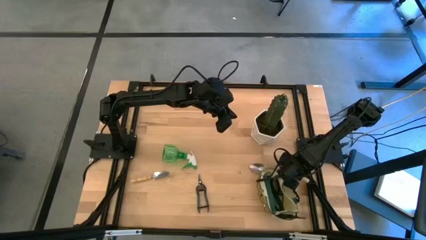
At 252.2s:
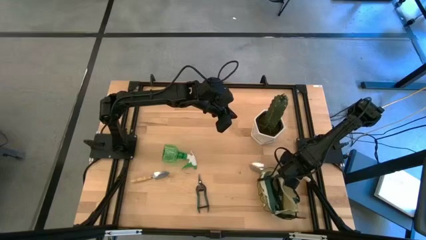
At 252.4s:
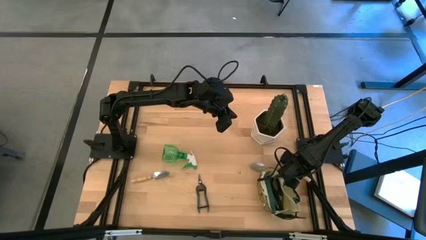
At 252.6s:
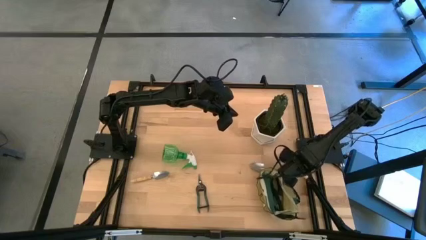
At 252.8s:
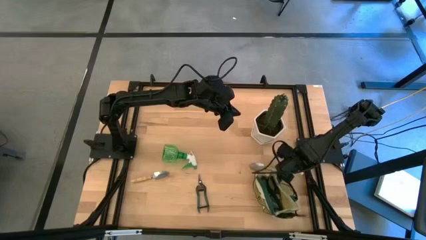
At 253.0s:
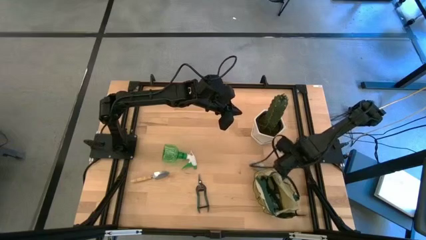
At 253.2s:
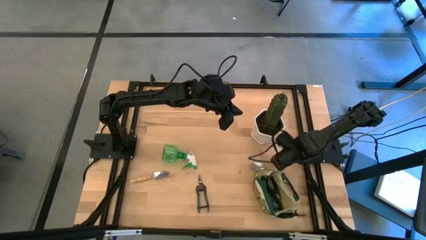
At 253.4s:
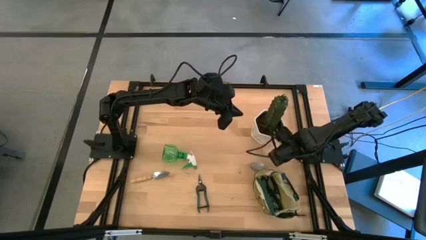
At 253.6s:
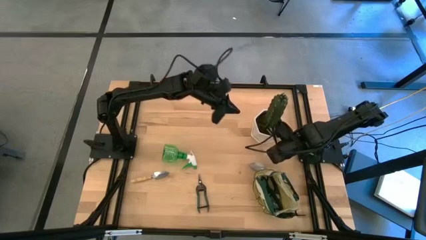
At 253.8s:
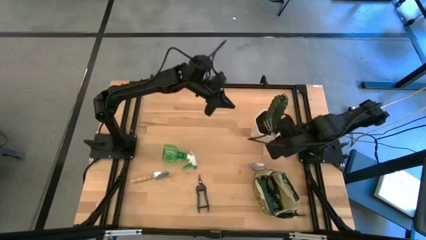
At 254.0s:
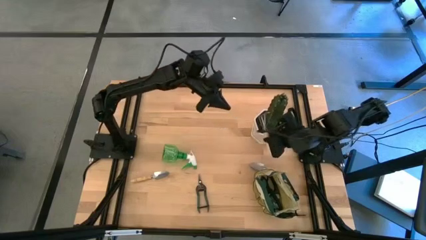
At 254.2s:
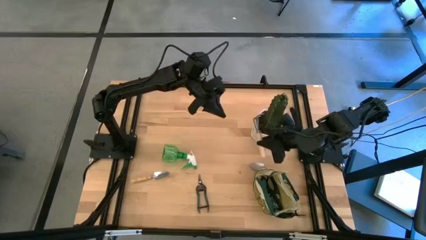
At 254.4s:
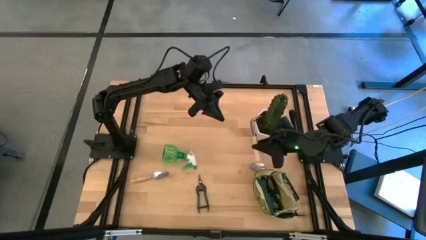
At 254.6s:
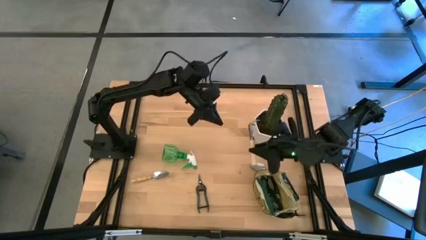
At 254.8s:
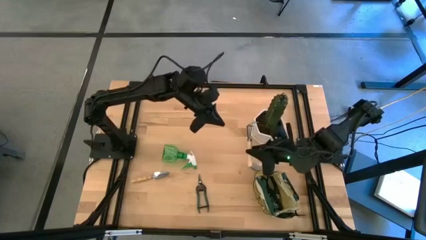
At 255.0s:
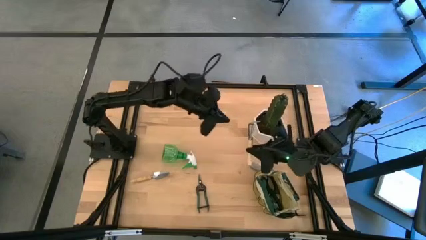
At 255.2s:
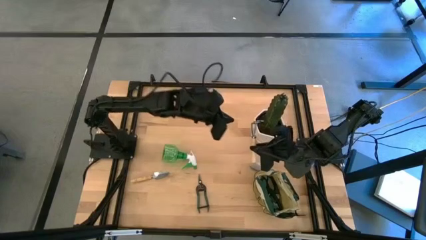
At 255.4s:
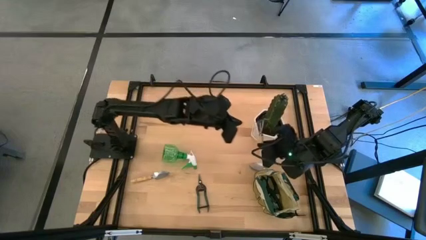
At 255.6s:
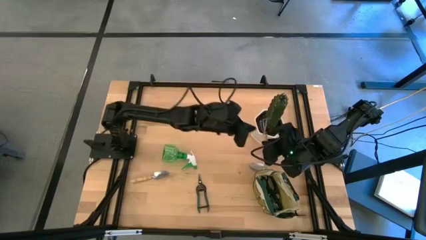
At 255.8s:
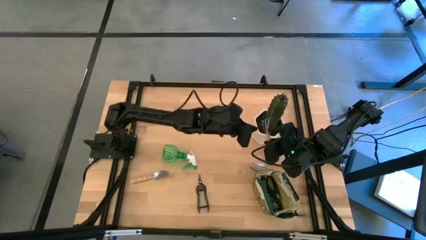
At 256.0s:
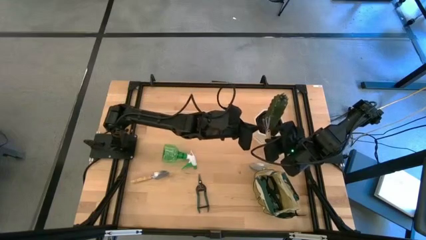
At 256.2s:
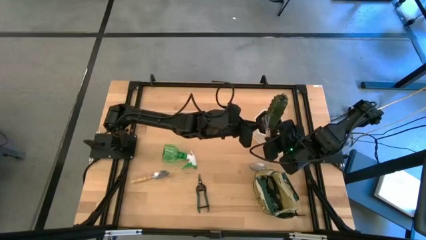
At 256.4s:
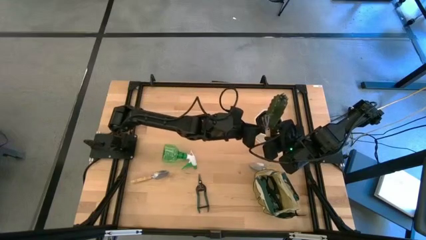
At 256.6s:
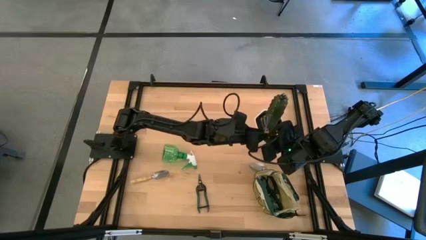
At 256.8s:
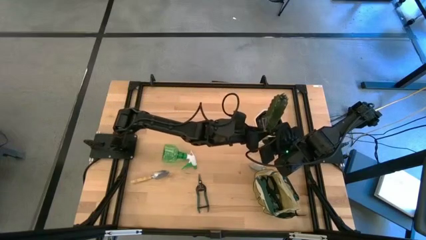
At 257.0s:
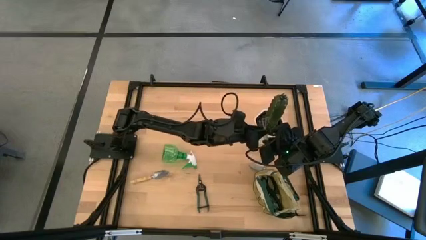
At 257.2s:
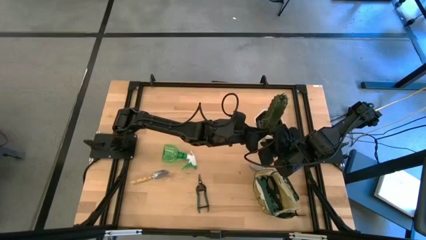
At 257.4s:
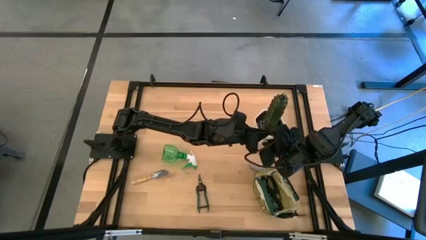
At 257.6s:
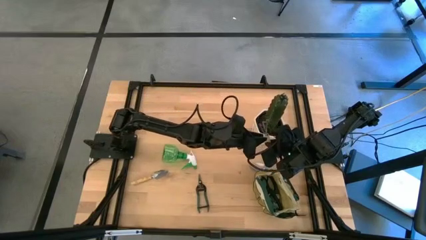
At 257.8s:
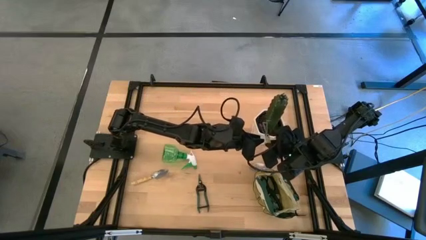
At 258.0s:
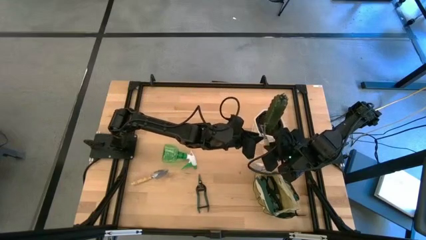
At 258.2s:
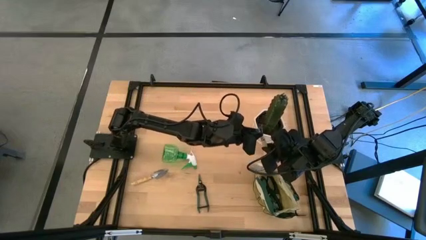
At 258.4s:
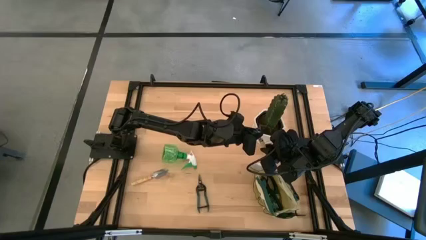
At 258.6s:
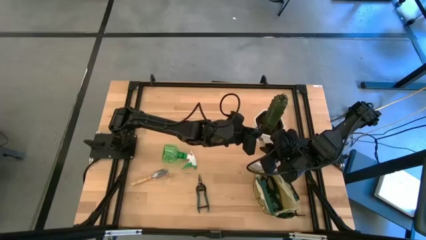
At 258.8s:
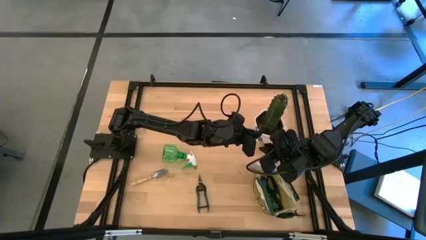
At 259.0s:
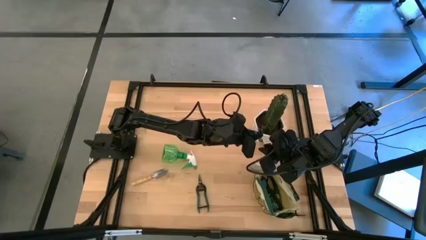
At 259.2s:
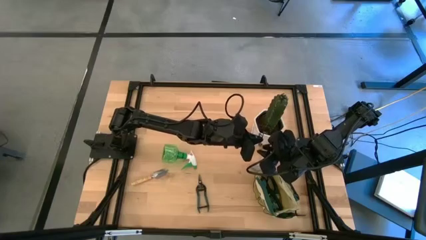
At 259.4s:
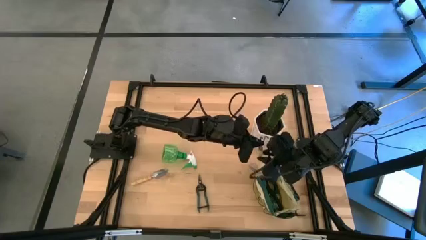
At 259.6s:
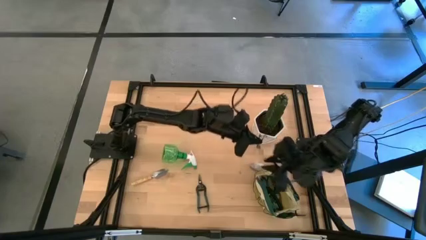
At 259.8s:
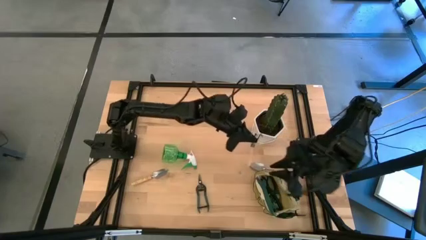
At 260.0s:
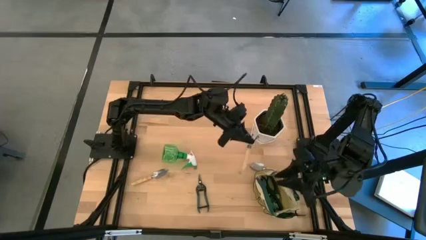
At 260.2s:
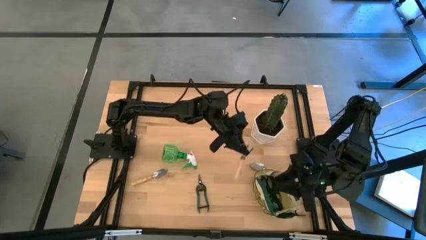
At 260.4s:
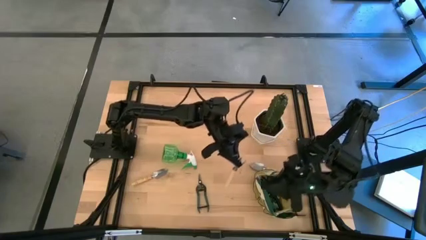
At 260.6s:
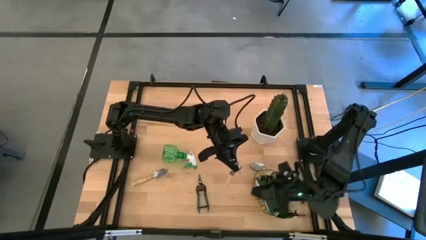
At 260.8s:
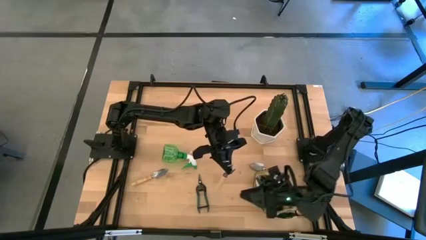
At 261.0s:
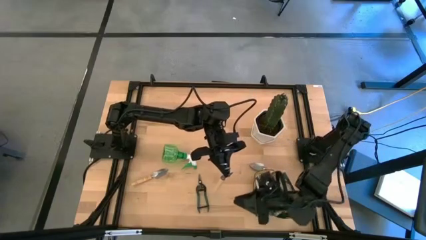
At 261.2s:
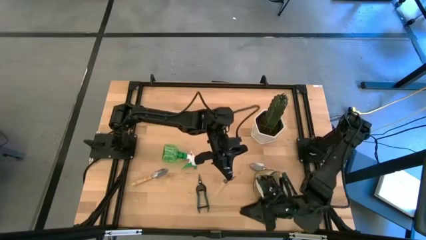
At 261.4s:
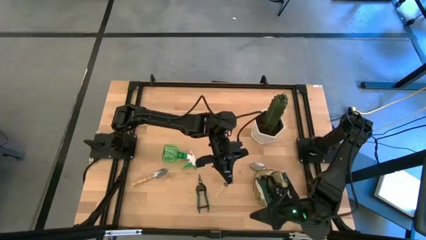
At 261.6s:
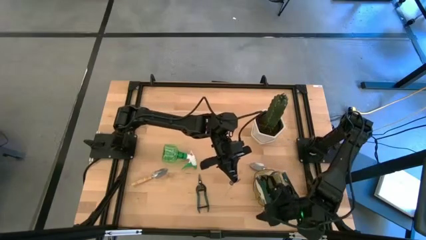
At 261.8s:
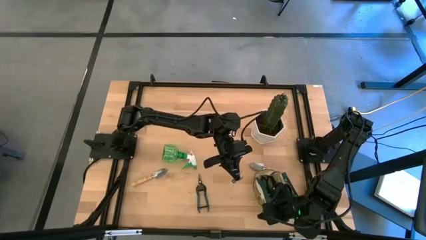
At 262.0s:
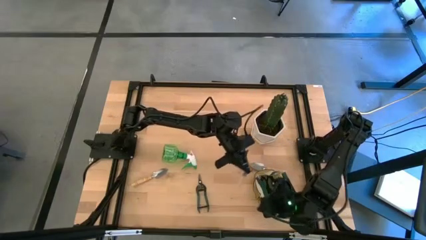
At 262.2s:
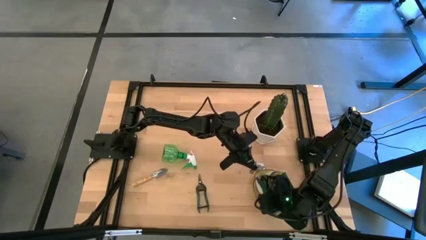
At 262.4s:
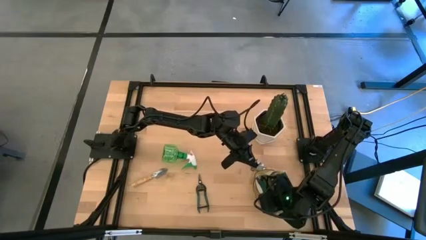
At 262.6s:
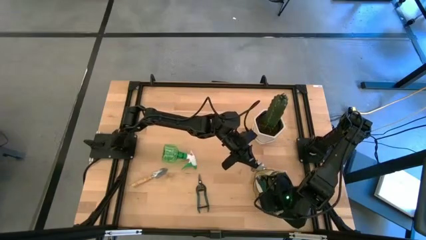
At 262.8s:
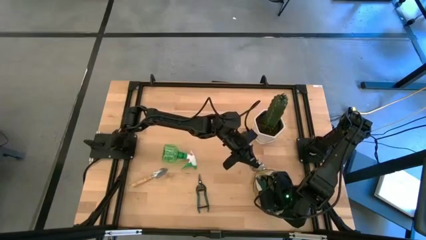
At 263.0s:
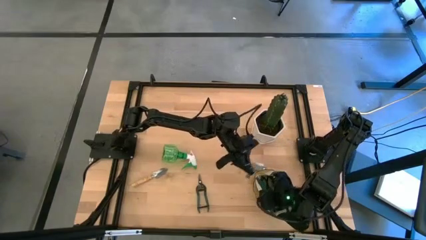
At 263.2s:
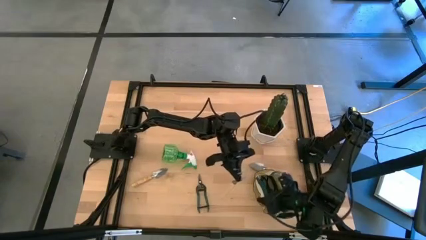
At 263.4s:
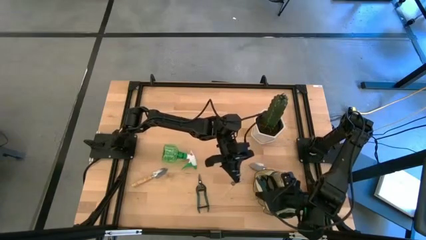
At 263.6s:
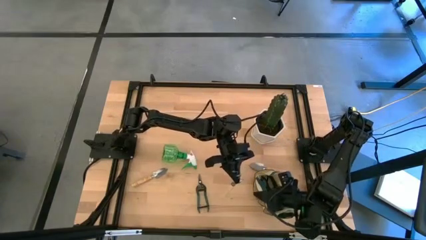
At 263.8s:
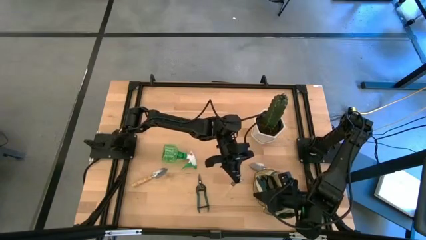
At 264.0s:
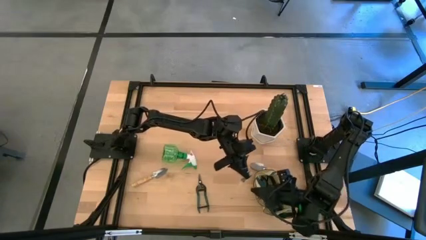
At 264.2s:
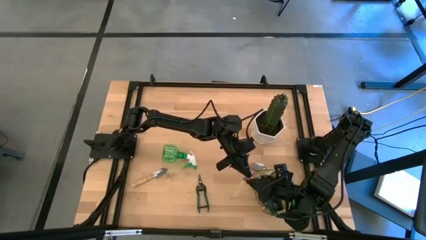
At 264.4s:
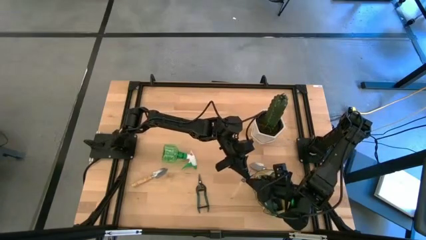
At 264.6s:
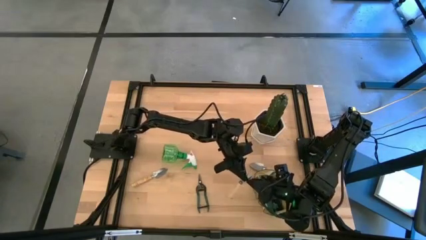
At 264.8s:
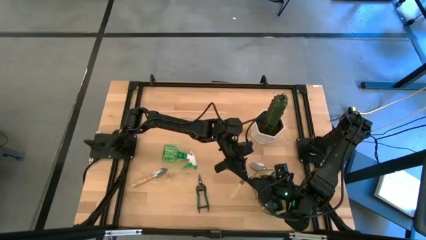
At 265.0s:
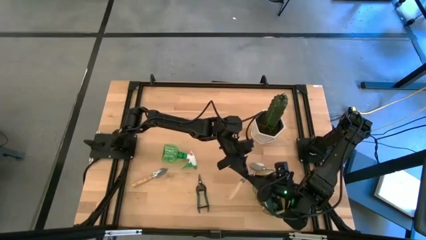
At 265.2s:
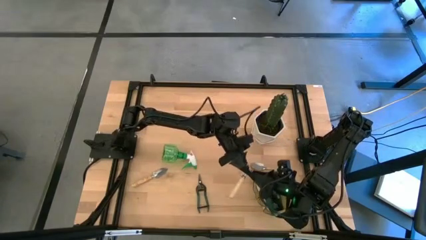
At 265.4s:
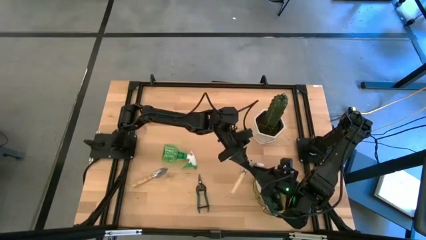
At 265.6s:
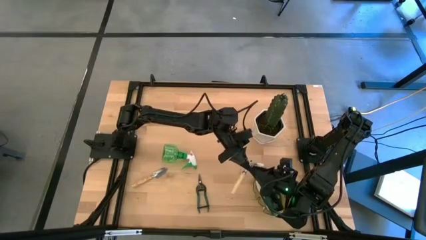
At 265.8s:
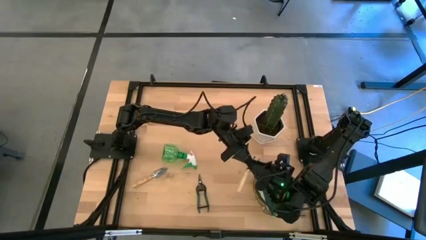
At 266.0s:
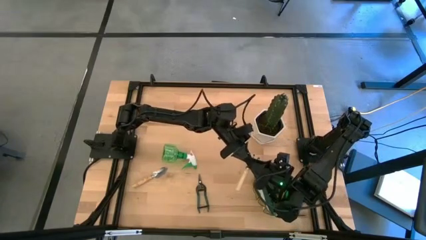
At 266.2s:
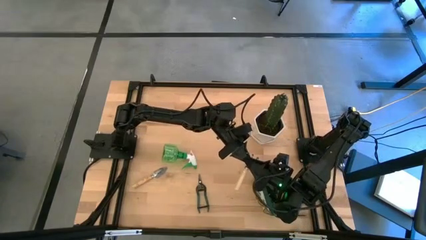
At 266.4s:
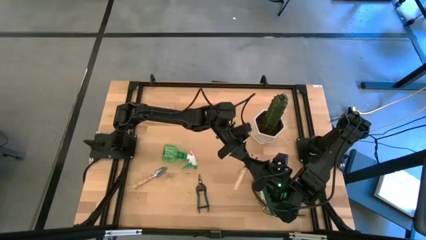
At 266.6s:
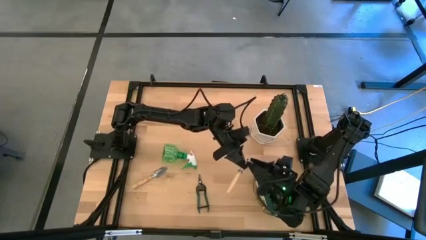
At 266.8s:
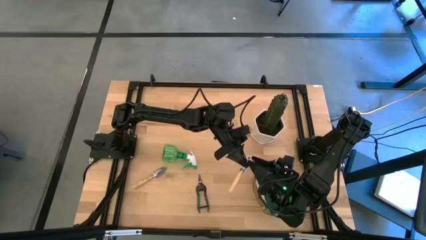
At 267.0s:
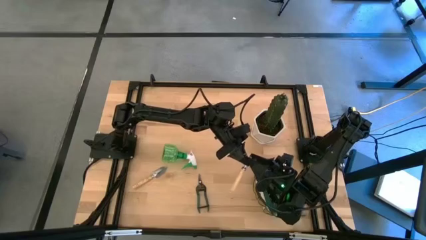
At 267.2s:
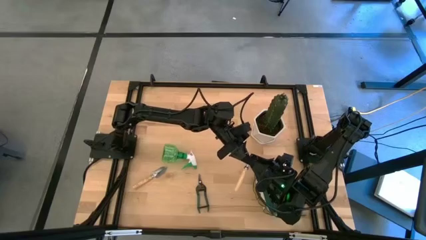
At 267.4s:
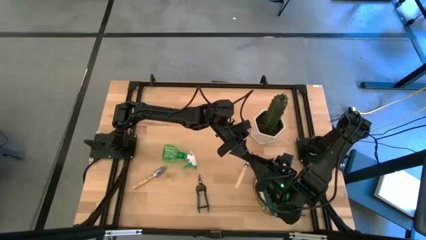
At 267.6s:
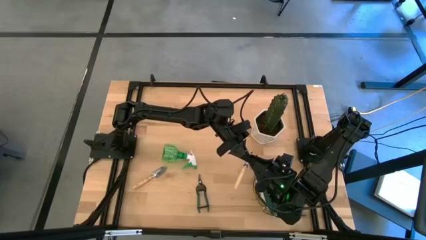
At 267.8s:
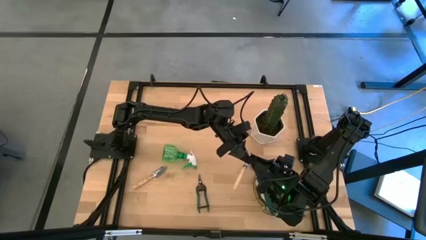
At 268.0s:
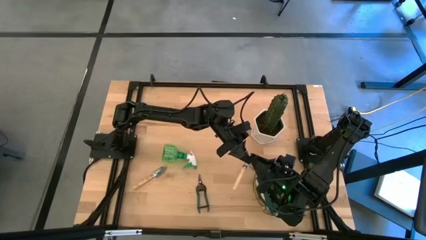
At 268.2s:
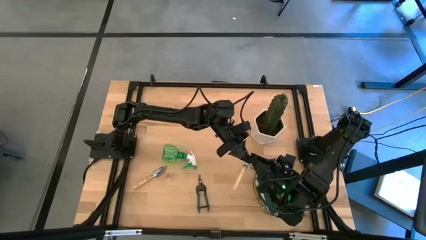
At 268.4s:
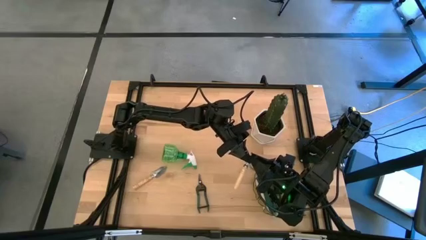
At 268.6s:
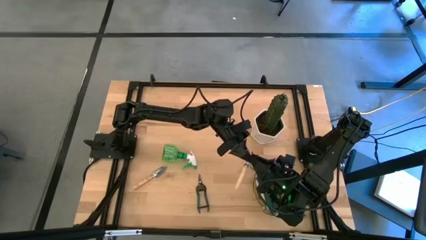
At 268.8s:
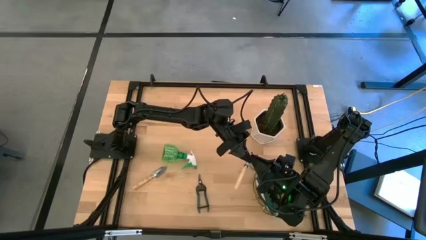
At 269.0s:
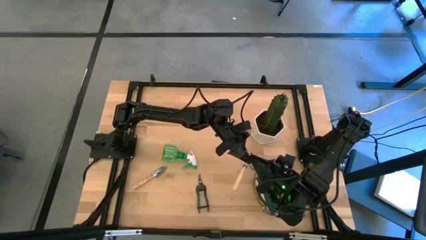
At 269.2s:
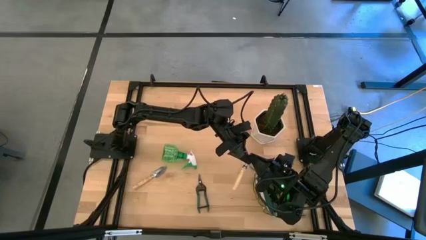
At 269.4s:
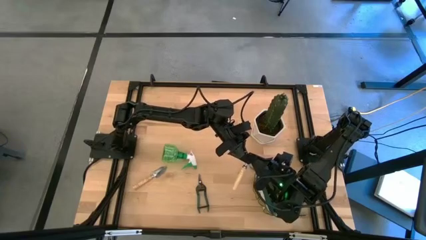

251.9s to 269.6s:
Task: Pick & Place Garden tools in Gardening bag
Put the hand rake into the side pocket of the white bag
